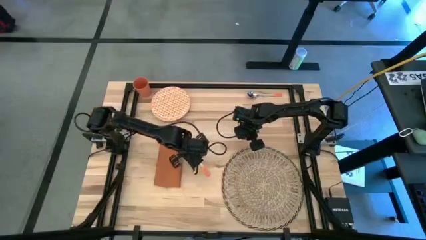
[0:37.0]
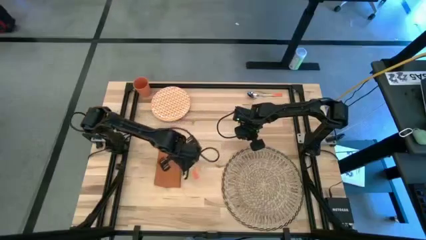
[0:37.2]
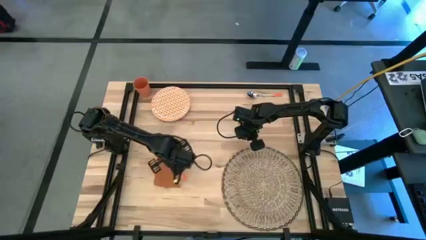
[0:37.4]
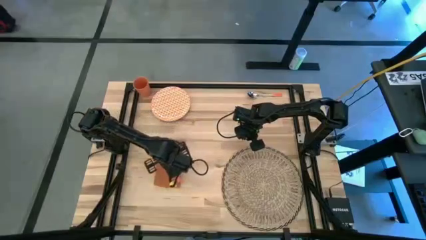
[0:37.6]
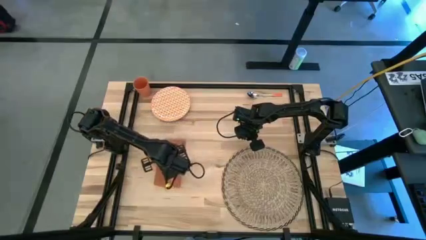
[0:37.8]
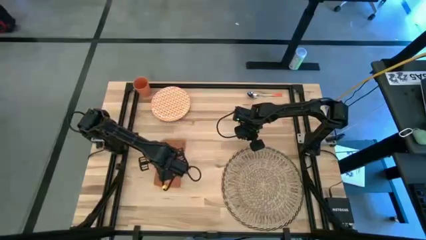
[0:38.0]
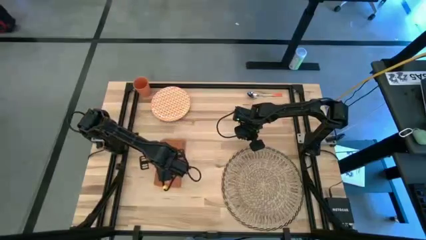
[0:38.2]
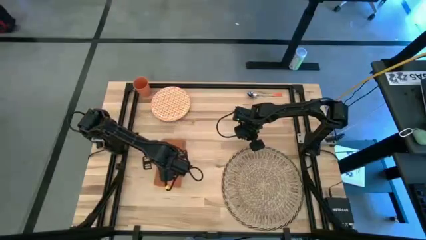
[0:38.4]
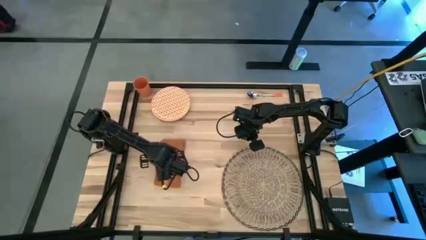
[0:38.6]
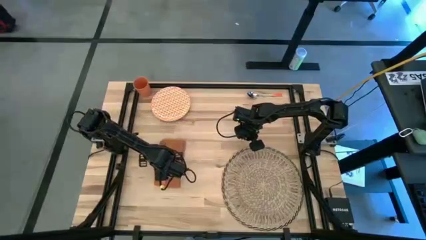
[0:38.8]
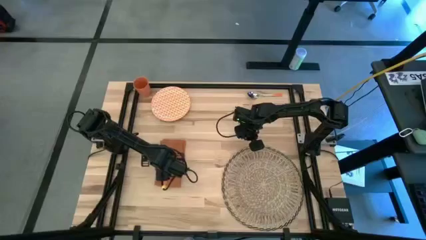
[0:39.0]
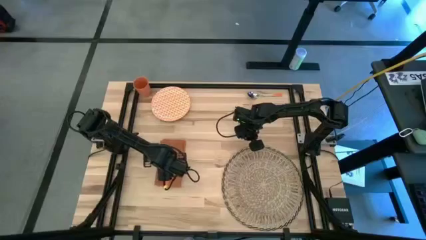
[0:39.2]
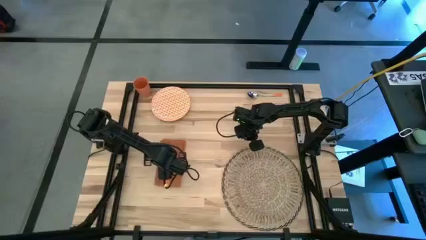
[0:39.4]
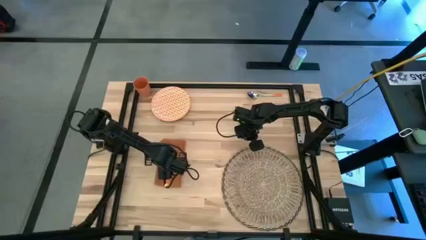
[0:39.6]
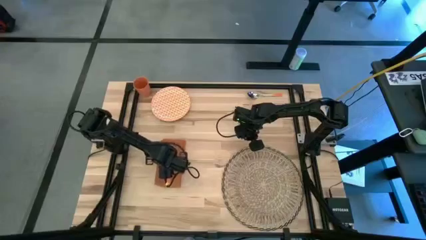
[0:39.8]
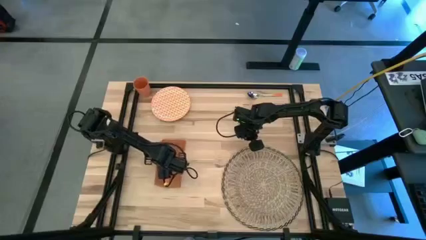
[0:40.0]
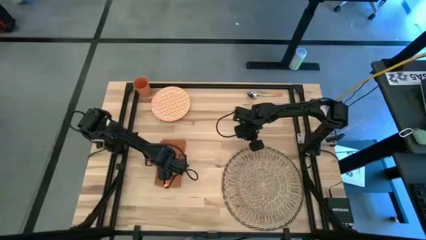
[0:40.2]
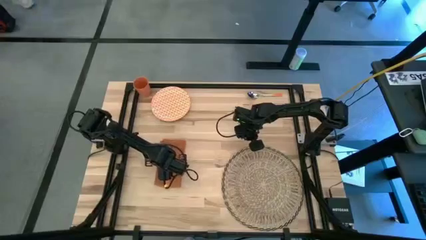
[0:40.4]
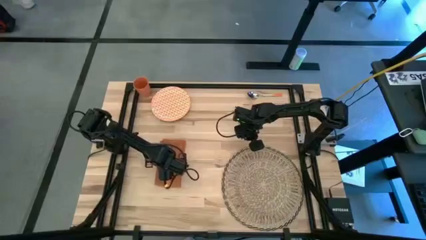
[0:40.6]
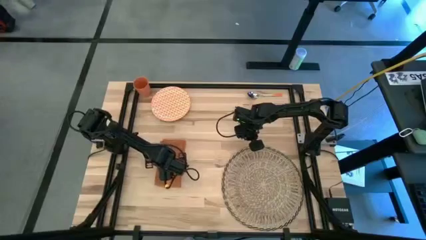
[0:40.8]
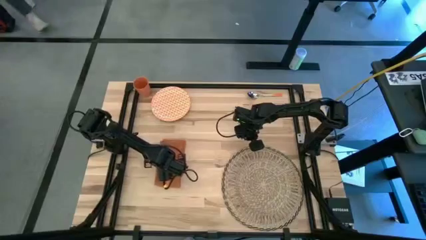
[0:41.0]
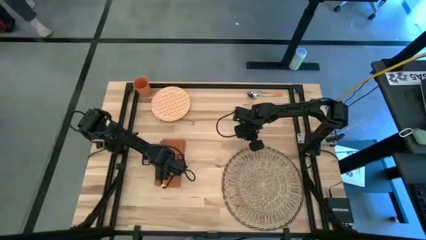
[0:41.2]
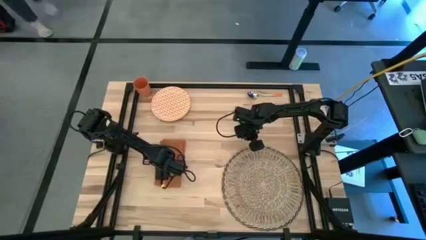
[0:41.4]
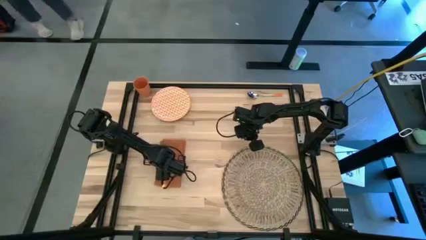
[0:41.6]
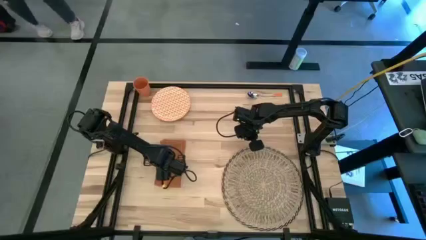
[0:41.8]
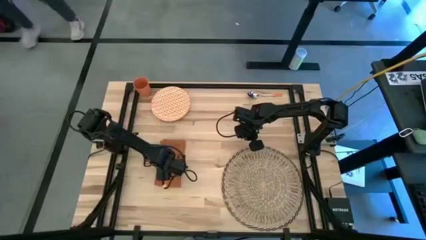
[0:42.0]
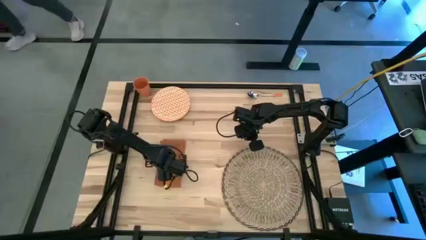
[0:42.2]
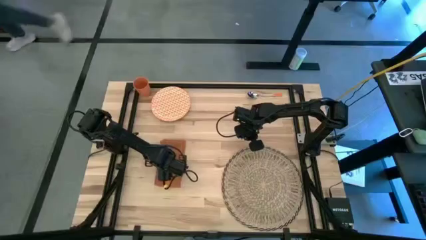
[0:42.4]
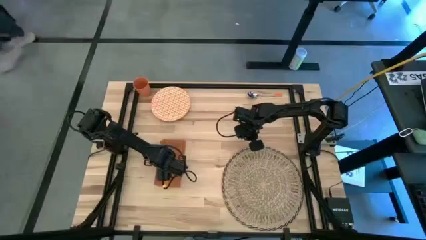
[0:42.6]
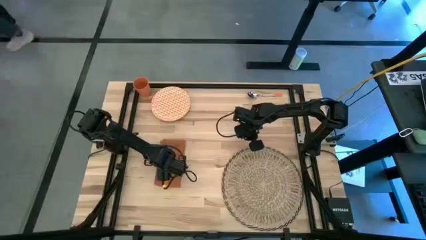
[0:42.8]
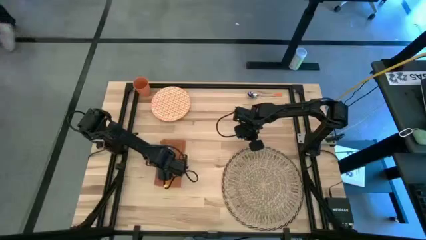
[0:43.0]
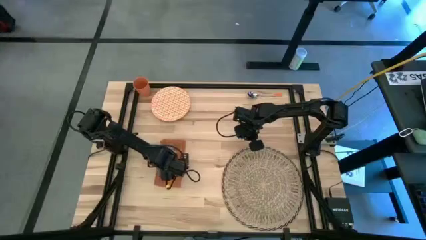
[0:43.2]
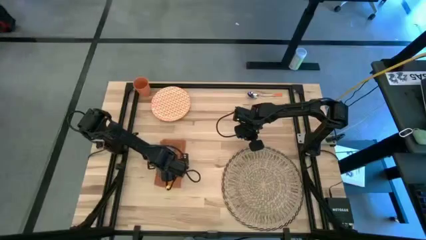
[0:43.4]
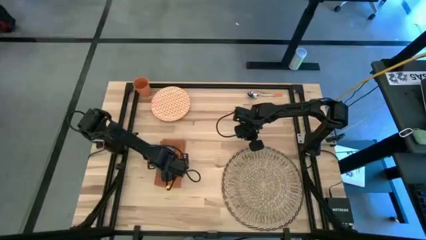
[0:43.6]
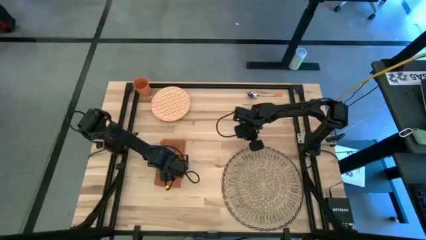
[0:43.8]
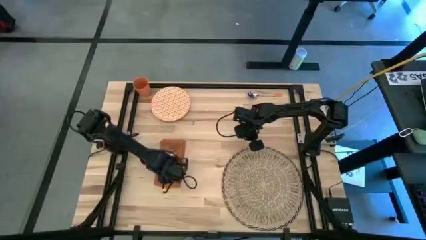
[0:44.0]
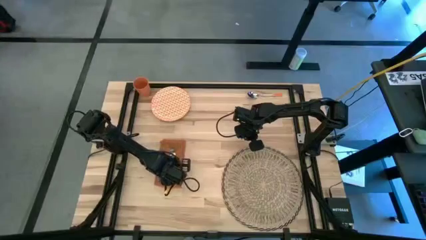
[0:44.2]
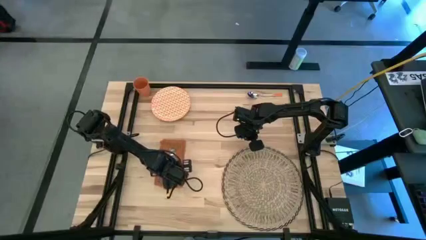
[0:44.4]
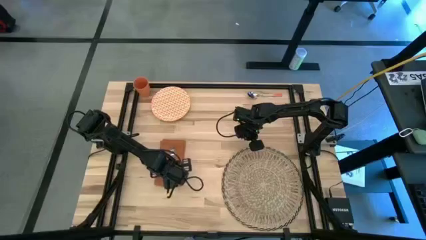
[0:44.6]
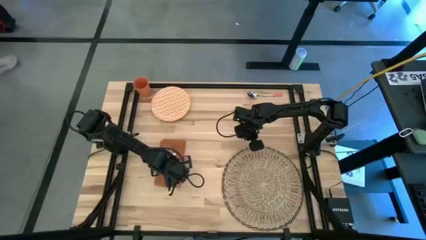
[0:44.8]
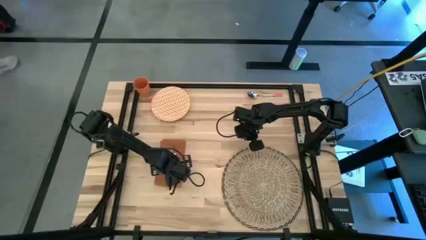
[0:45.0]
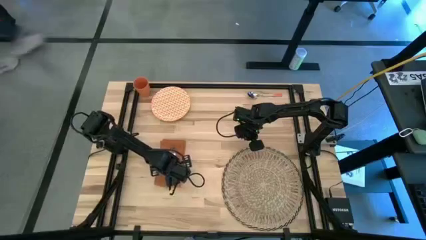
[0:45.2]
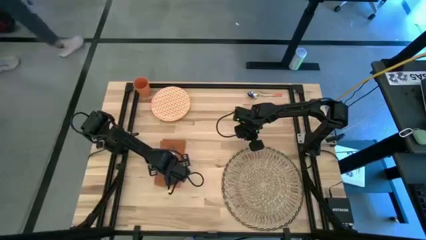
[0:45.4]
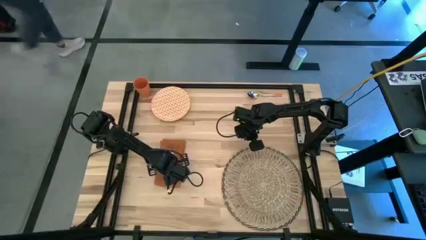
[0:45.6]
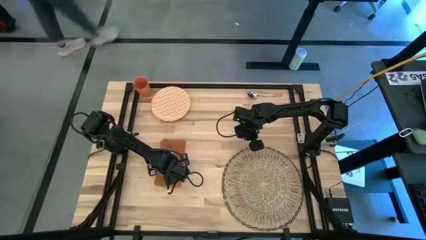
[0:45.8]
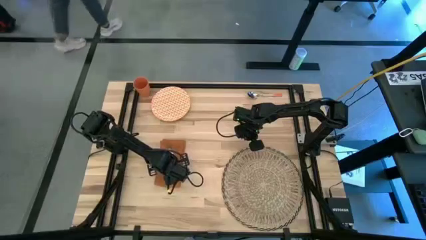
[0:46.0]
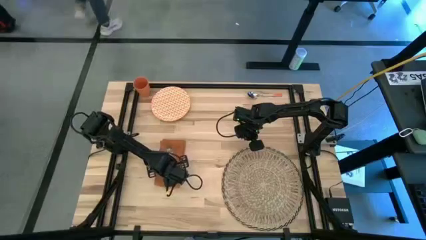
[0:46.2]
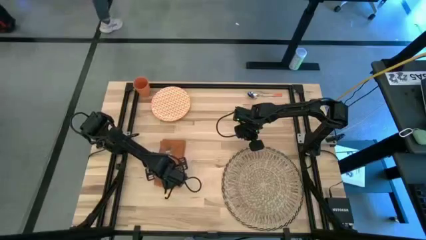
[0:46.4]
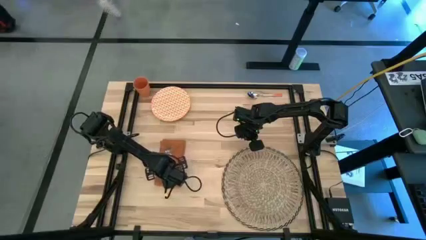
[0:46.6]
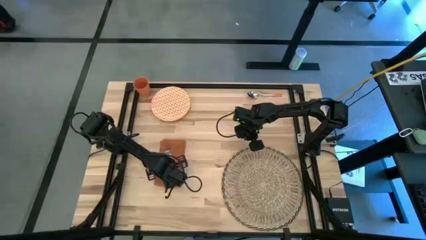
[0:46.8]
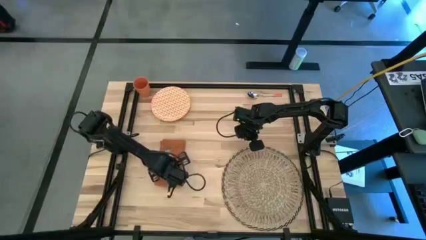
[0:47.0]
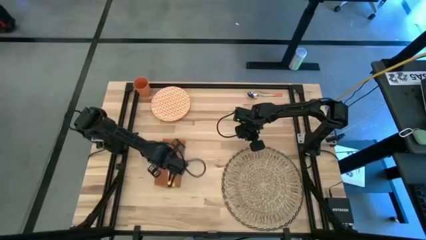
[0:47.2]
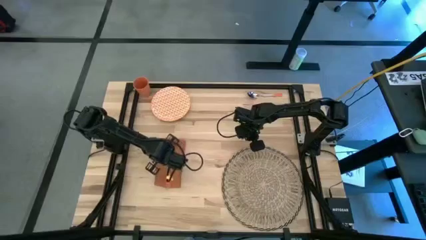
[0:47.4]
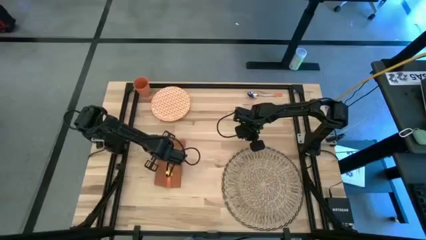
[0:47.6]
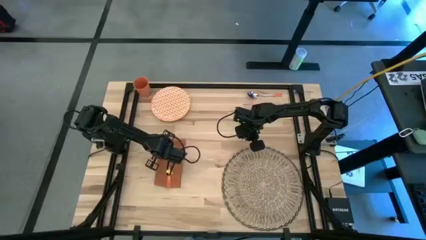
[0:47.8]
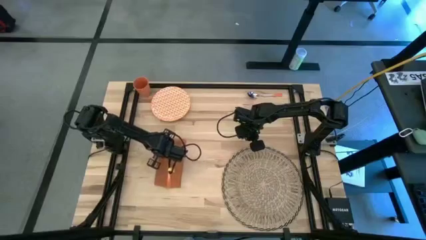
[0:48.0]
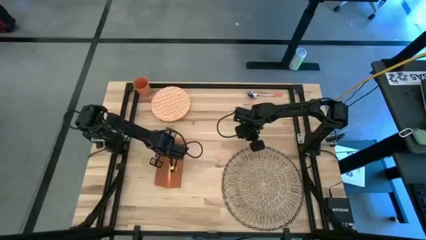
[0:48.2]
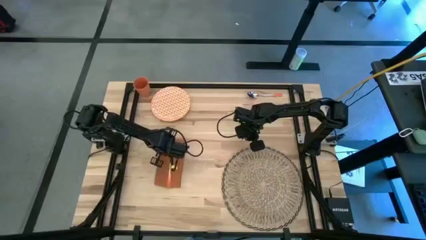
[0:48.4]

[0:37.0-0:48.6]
Task: Set table place
Put the orange fork on top of the orange table napkin

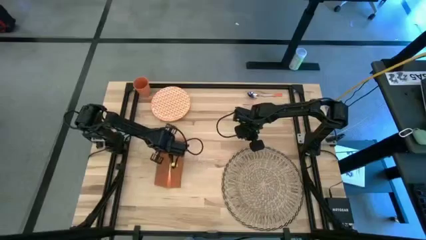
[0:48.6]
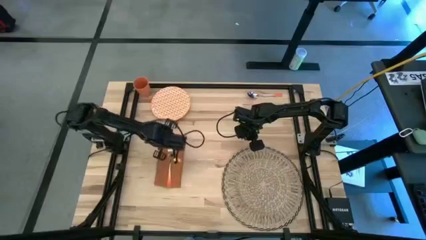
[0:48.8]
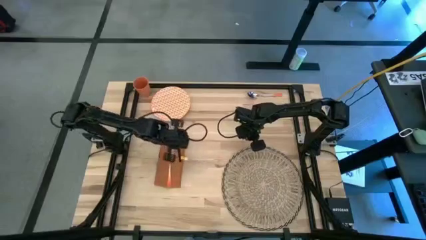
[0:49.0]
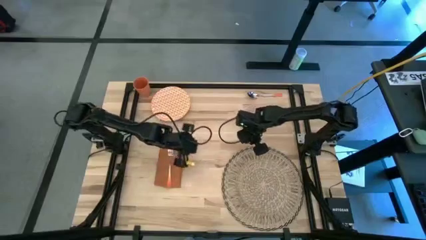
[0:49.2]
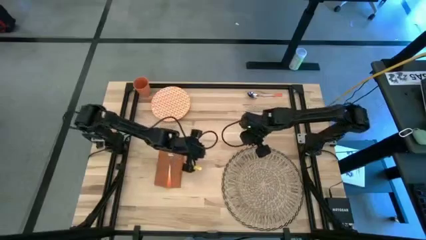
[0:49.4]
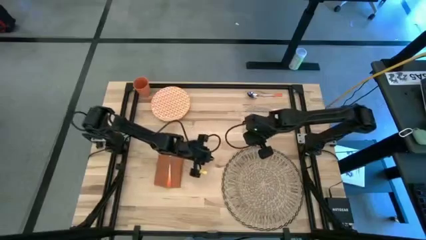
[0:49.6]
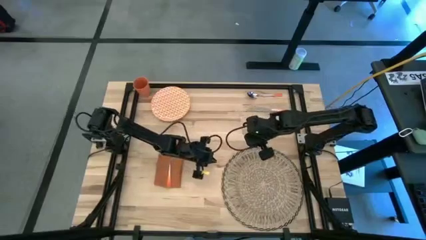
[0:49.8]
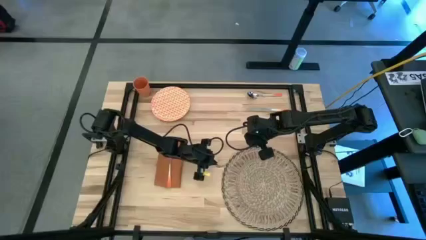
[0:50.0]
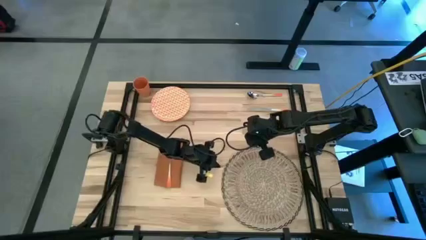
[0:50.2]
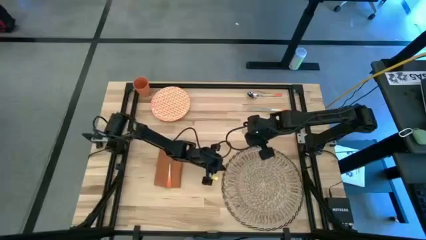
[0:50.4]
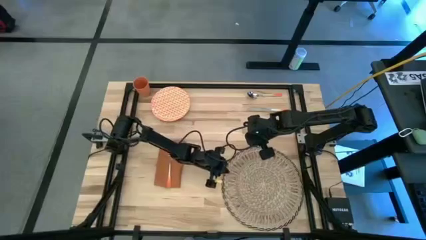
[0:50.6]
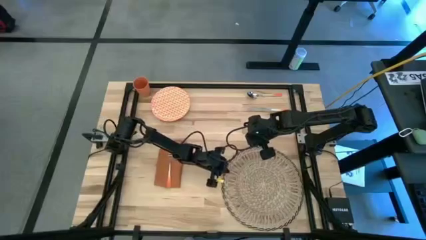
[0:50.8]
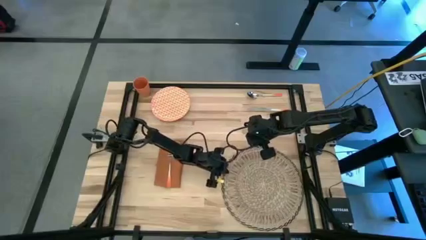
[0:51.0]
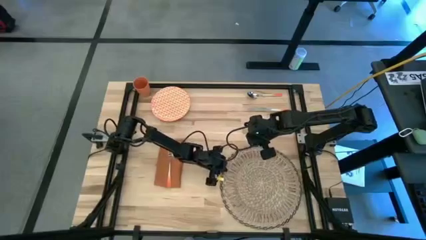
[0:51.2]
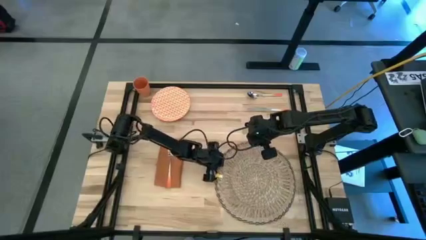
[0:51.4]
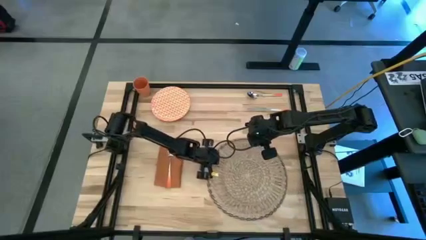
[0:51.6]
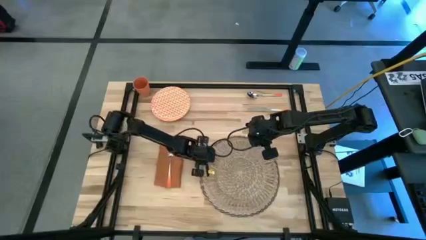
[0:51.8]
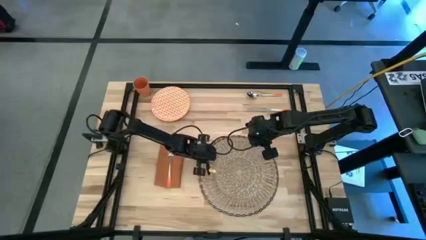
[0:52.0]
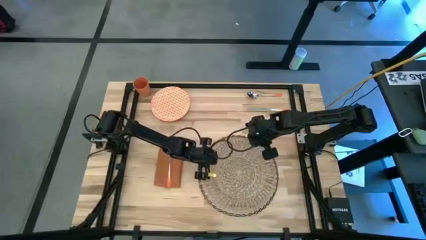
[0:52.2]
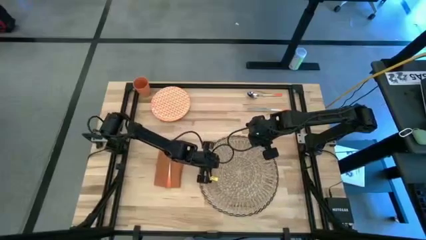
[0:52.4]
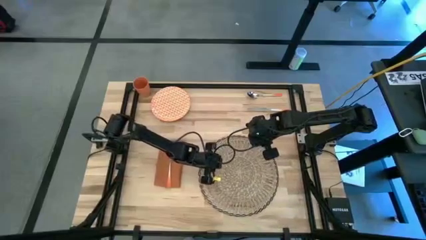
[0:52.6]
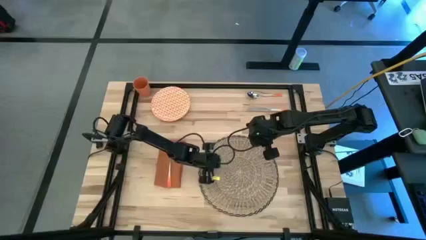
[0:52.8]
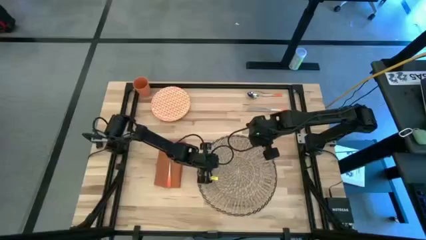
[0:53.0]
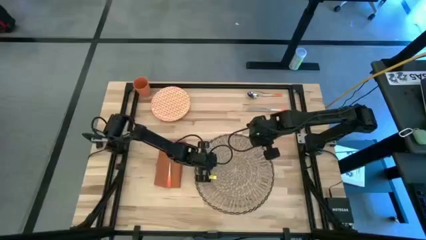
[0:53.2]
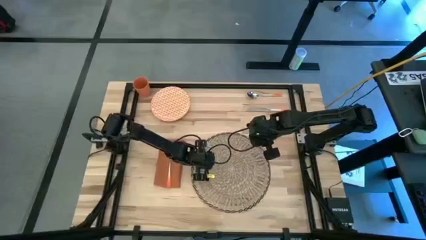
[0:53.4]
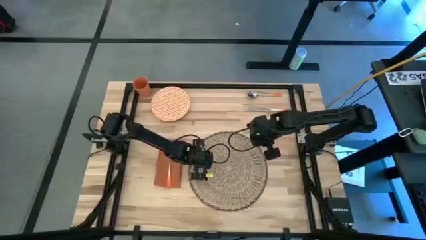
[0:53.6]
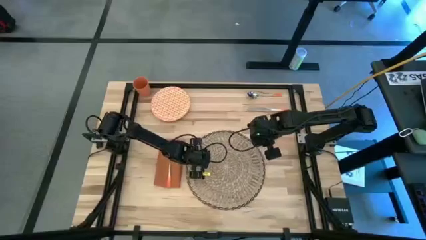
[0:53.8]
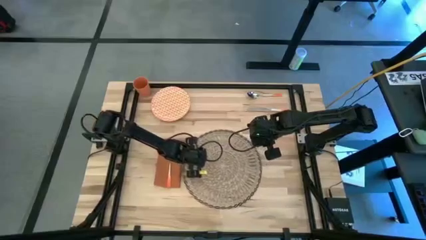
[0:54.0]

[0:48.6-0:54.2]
Move the brown table mat to the center the table
